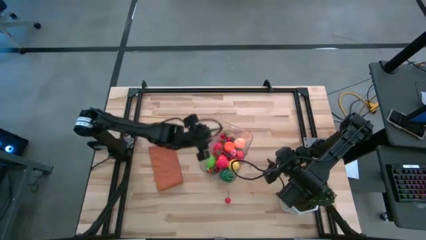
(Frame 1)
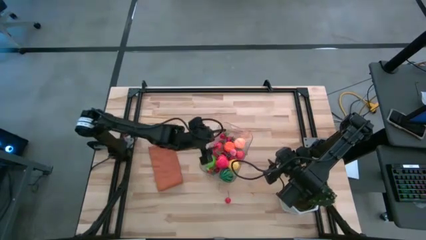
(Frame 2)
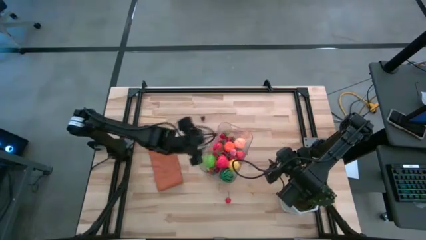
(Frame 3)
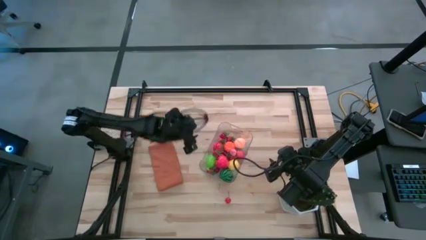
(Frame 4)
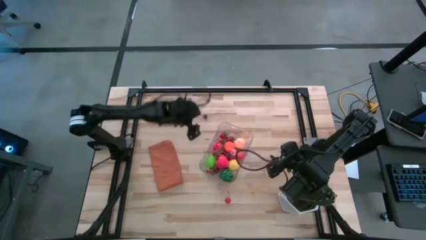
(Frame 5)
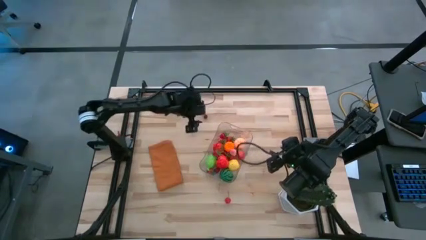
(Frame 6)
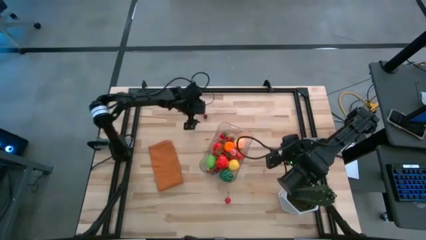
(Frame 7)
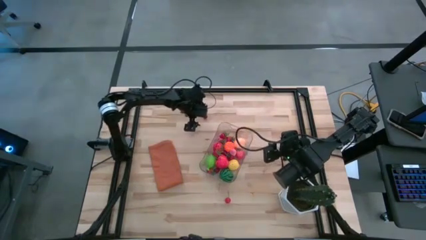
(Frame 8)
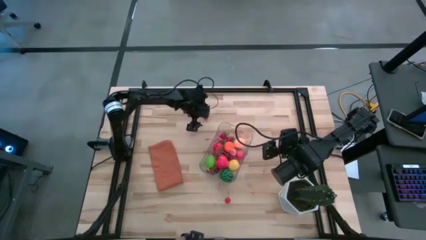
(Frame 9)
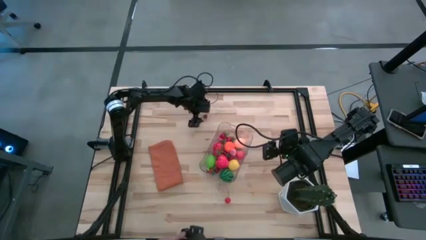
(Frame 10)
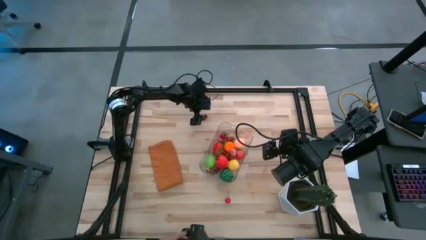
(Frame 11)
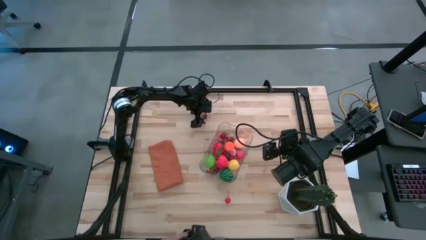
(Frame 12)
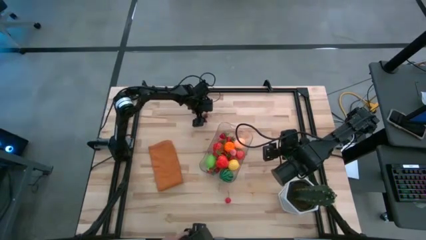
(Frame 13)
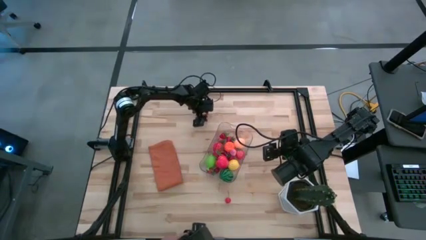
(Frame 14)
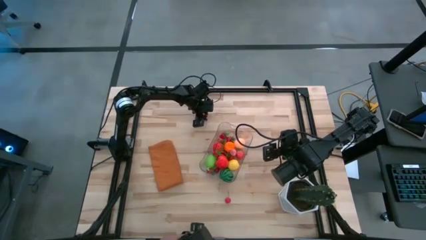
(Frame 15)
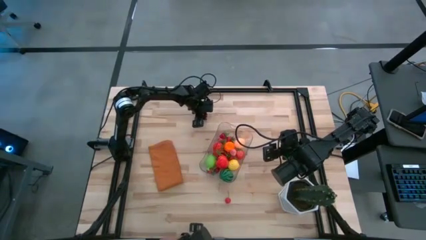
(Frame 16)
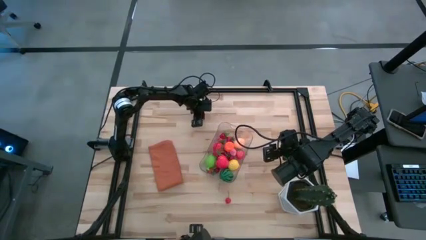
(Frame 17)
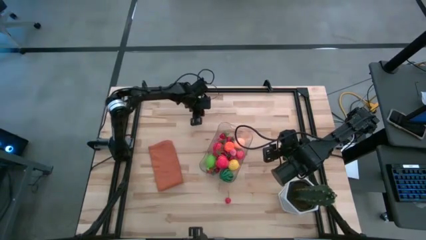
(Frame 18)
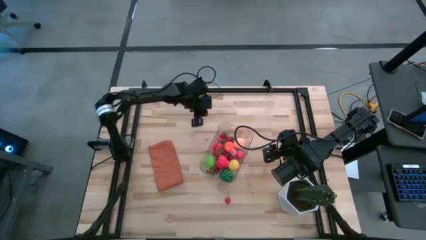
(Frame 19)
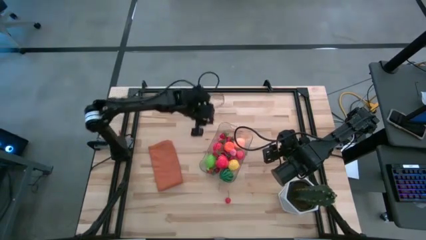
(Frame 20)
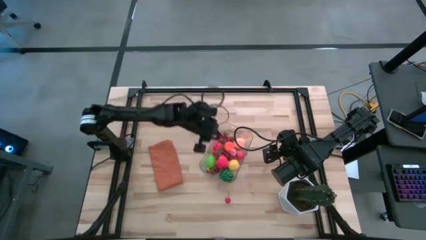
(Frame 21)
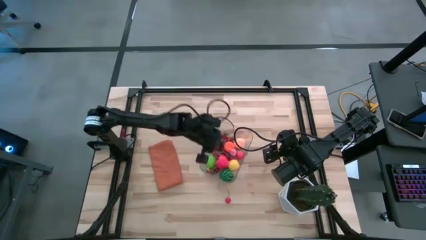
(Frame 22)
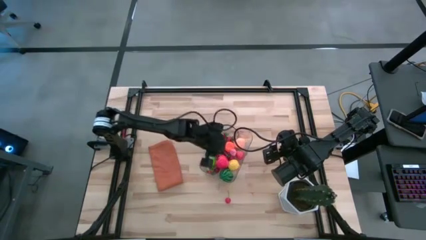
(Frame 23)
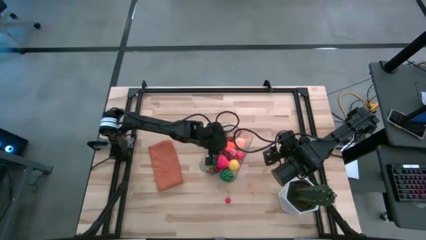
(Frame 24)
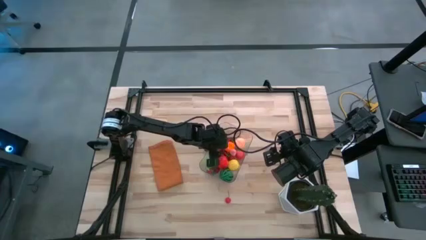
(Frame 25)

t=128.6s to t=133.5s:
Task: Pick and placing Produce into tupperware
Put the red cherry into the transparent bin

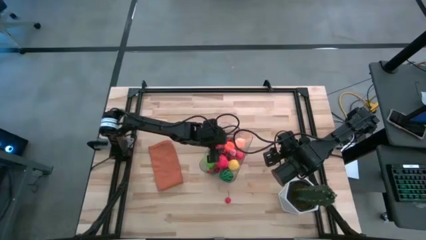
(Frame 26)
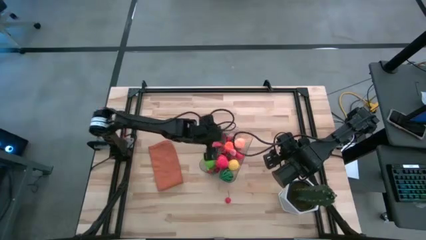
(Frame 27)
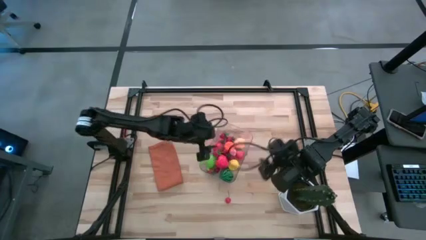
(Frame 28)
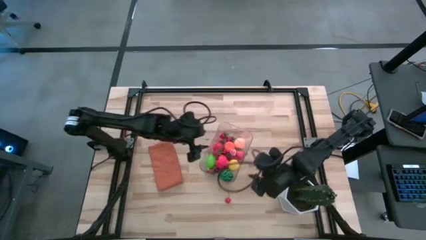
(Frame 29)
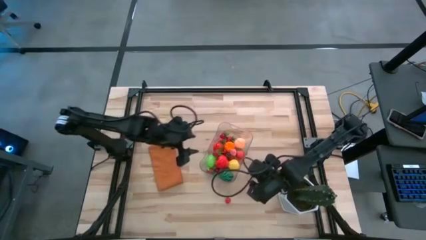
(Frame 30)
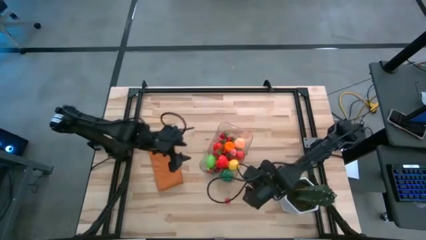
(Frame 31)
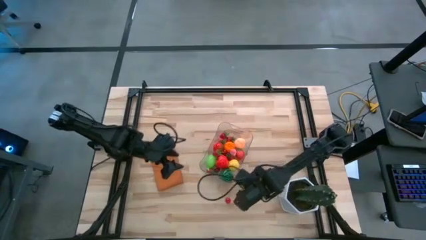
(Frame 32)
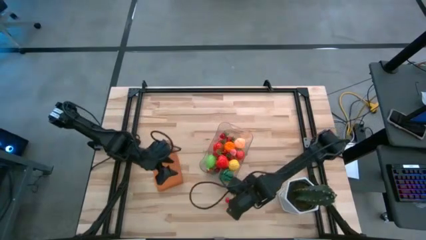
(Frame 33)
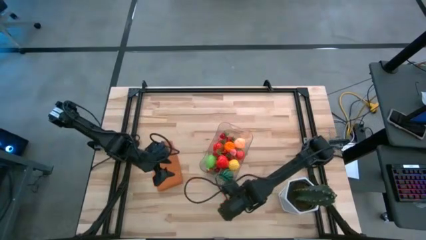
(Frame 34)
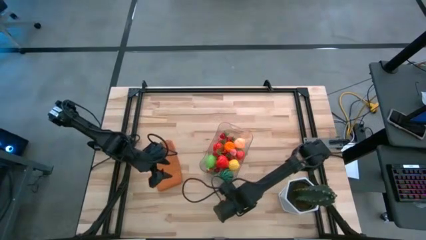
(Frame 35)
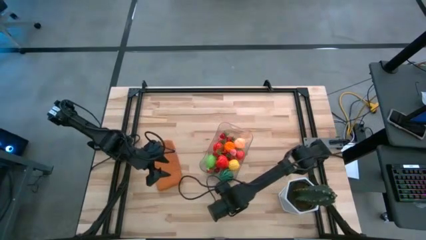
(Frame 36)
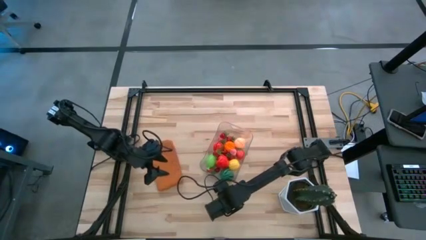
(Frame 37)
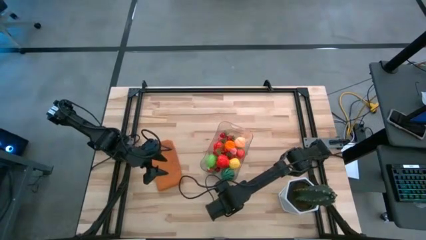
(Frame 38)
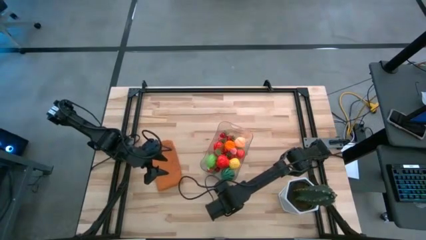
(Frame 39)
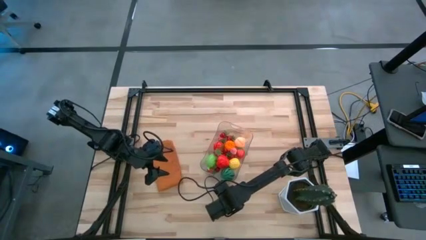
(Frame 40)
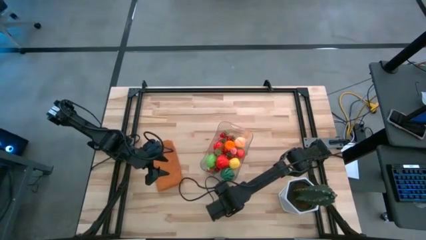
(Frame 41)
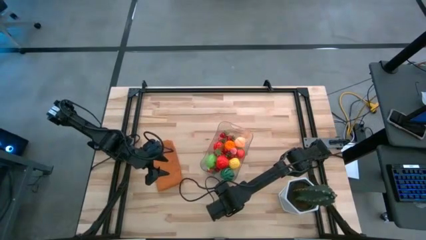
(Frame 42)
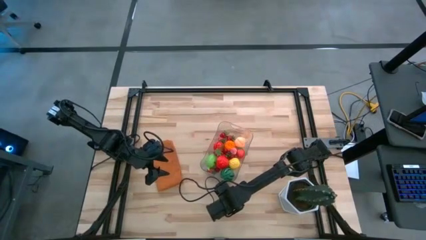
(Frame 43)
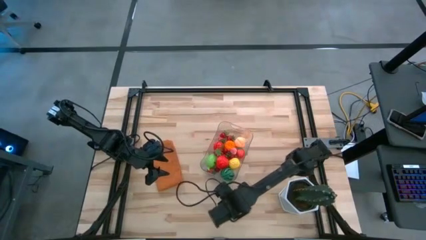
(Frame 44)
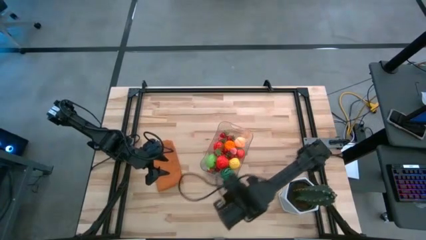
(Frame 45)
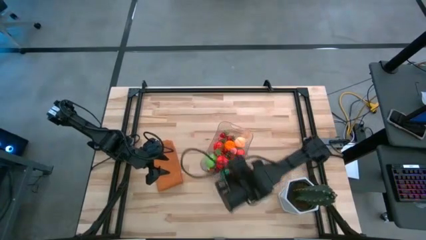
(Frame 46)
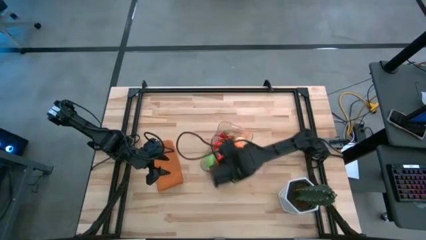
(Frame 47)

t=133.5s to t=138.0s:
Put the red cherry into the transparent bin

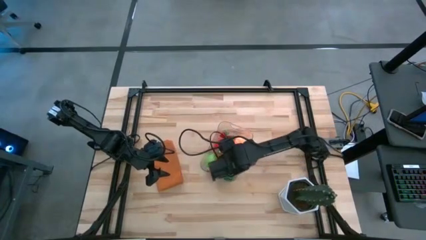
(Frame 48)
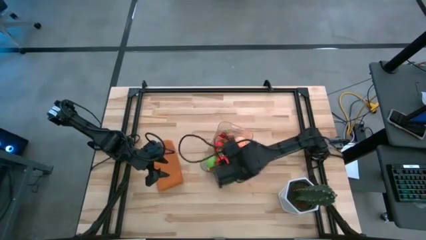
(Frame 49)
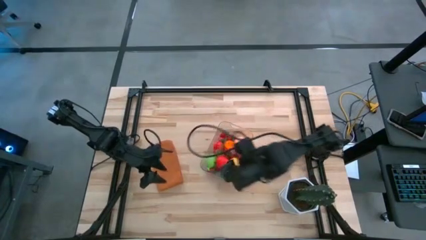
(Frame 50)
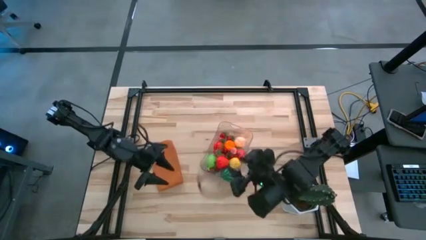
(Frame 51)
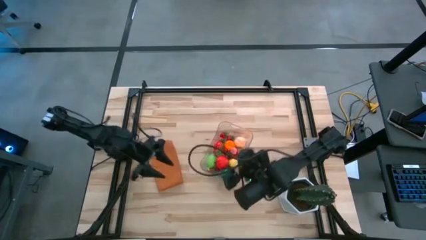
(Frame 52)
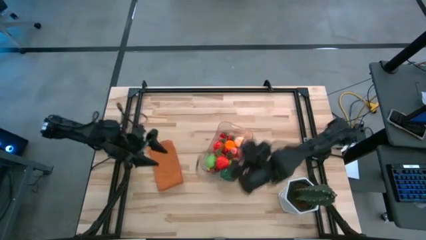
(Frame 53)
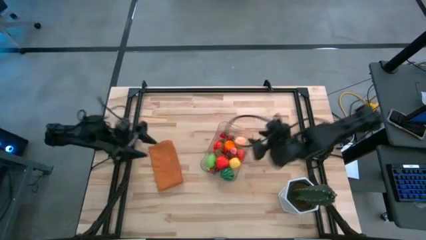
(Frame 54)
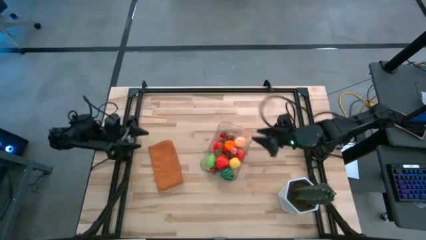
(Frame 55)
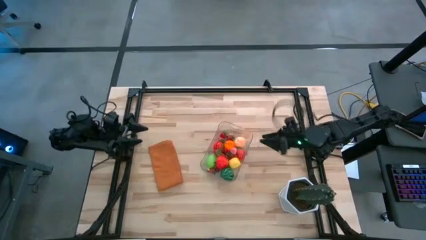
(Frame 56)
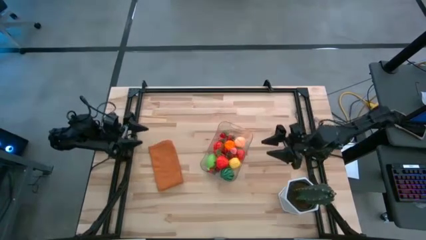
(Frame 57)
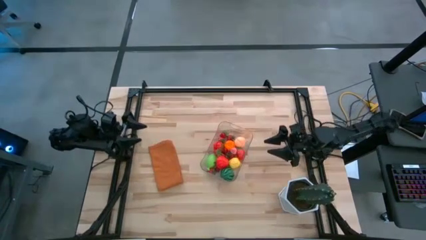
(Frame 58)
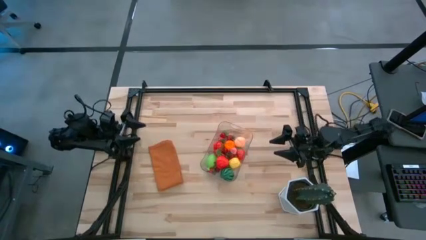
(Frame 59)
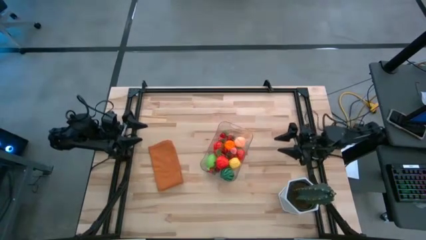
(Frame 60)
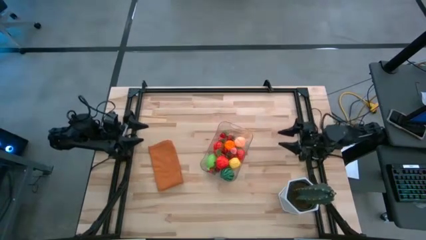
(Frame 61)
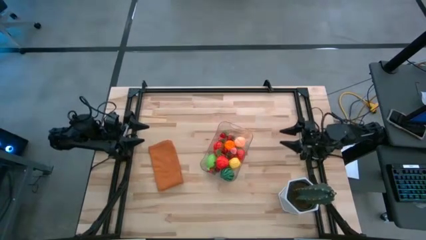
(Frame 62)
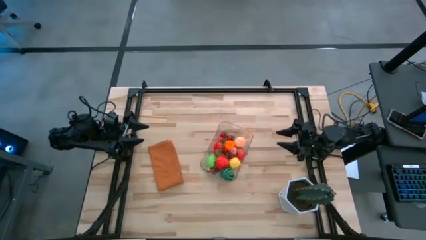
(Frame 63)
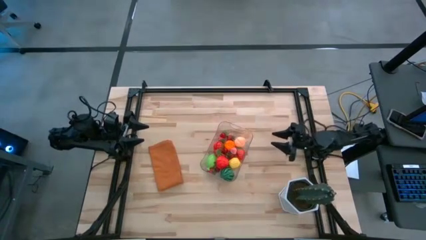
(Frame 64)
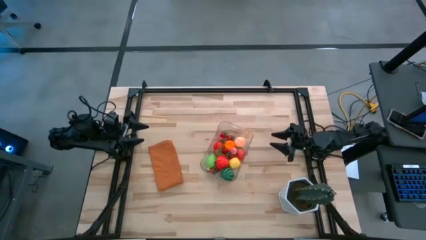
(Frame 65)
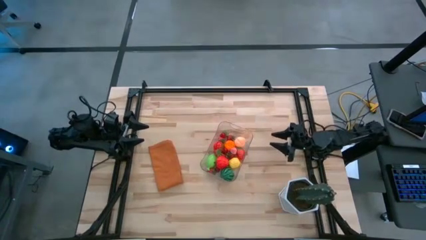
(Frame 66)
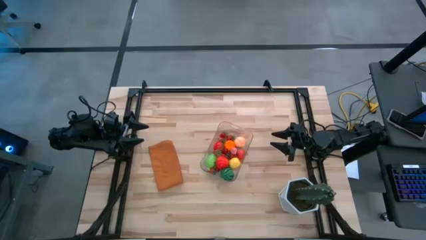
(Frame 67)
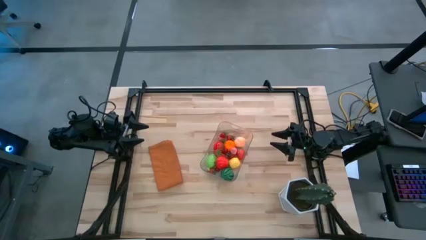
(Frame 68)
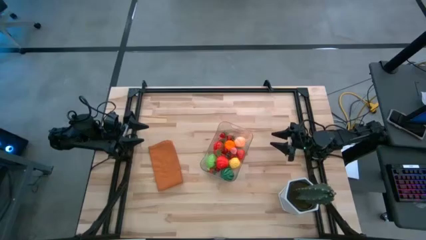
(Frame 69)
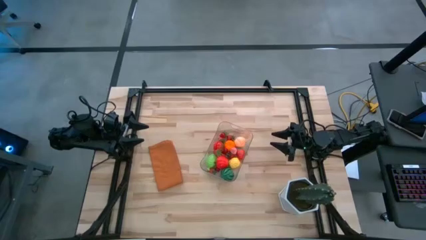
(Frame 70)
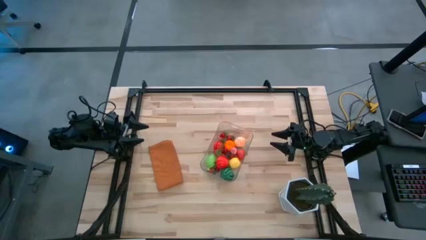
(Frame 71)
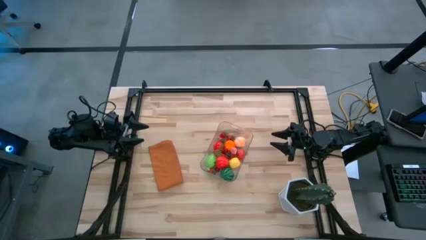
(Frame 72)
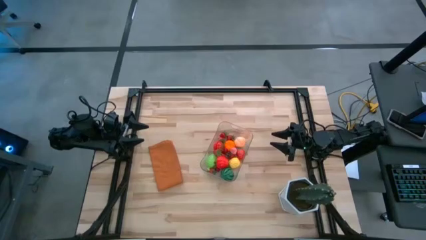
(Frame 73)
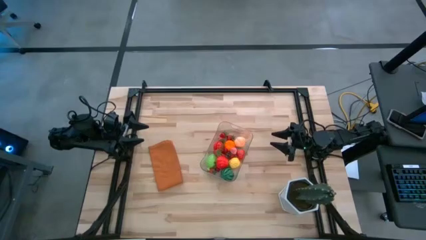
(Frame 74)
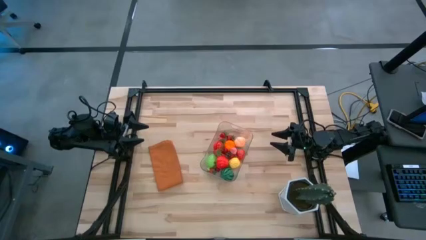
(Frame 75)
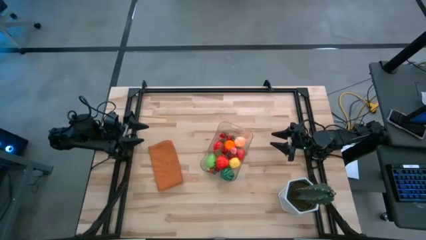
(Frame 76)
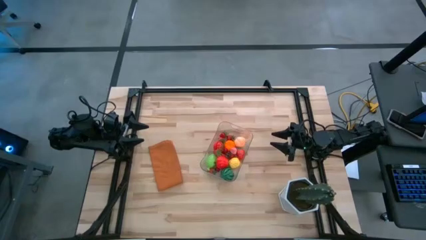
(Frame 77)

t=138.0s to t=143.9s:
Return to Home Position
